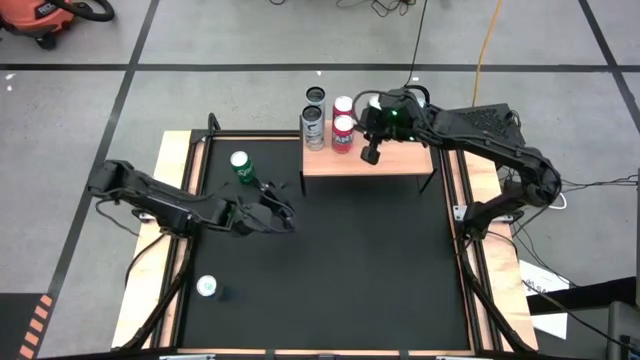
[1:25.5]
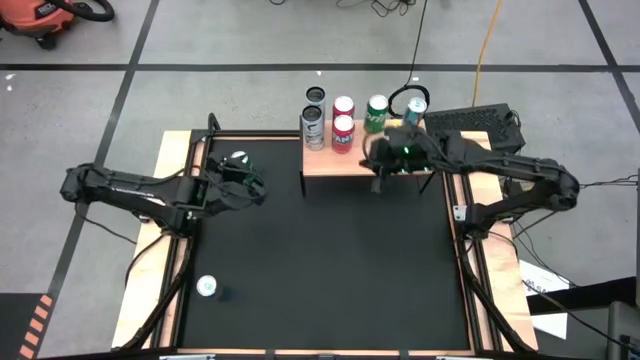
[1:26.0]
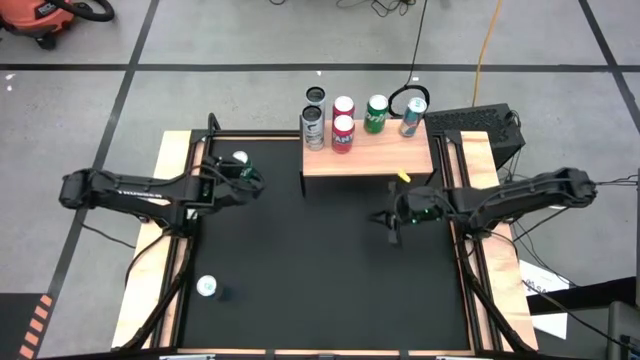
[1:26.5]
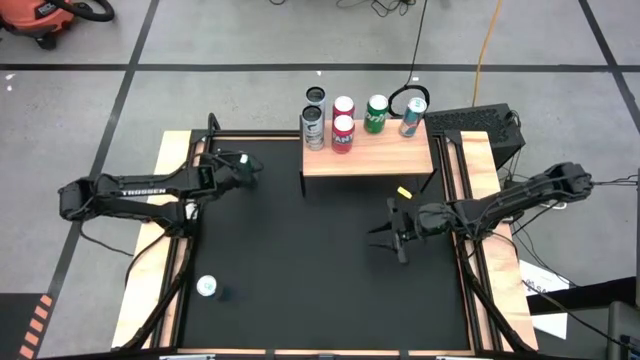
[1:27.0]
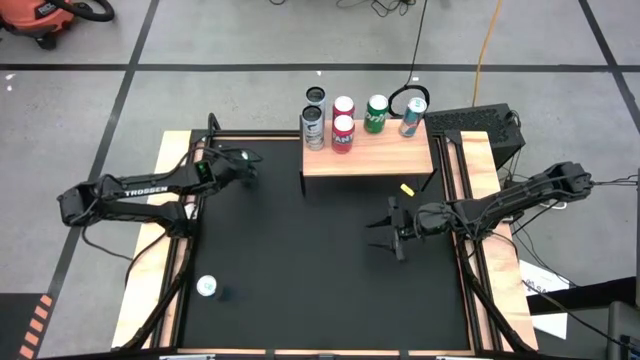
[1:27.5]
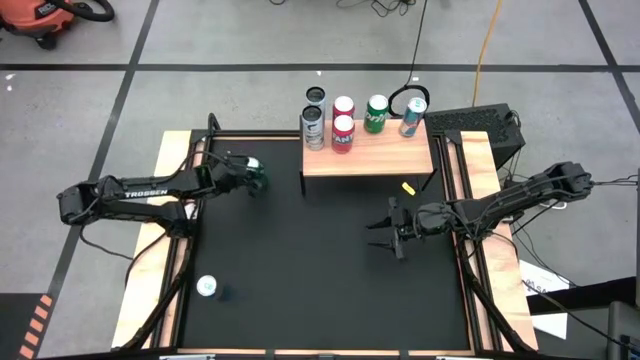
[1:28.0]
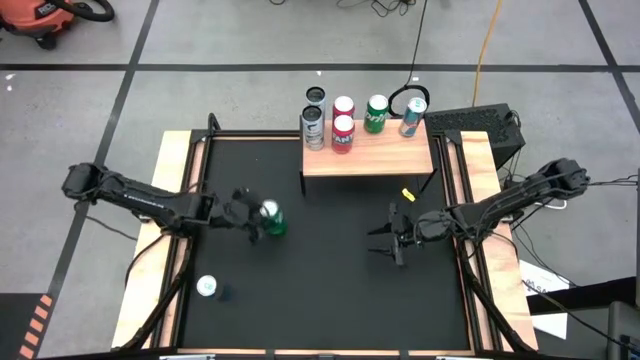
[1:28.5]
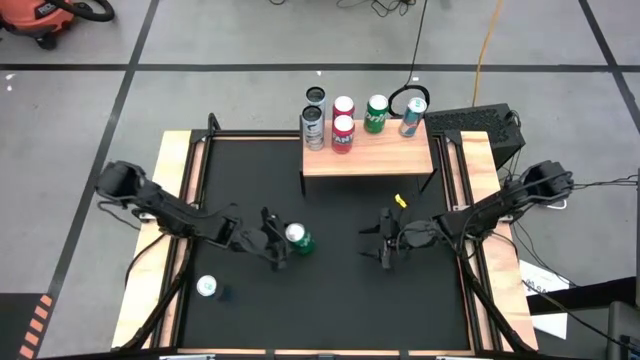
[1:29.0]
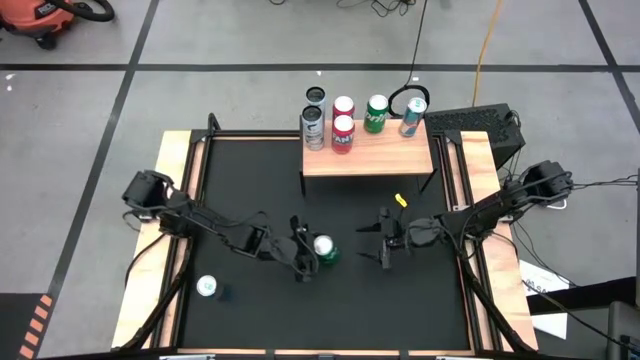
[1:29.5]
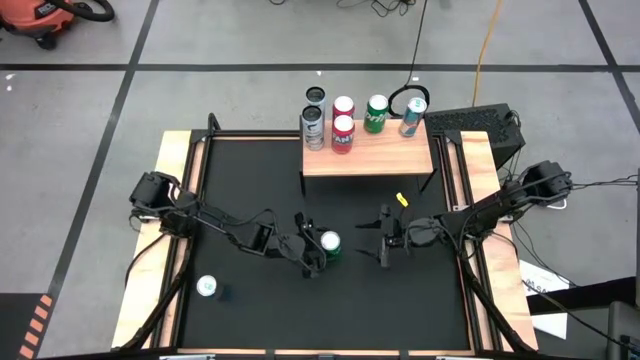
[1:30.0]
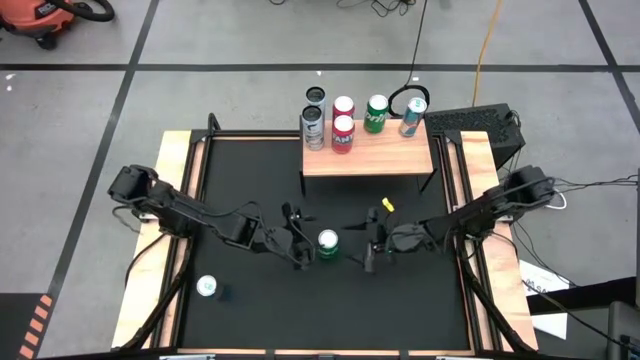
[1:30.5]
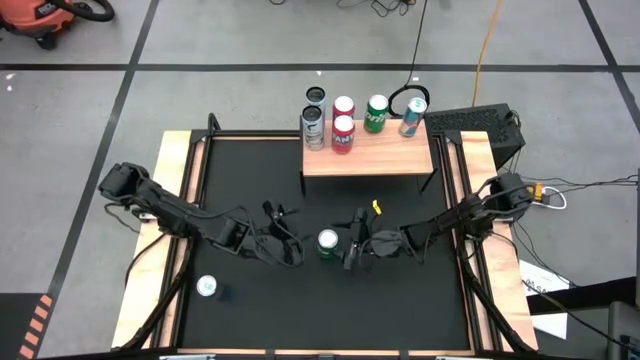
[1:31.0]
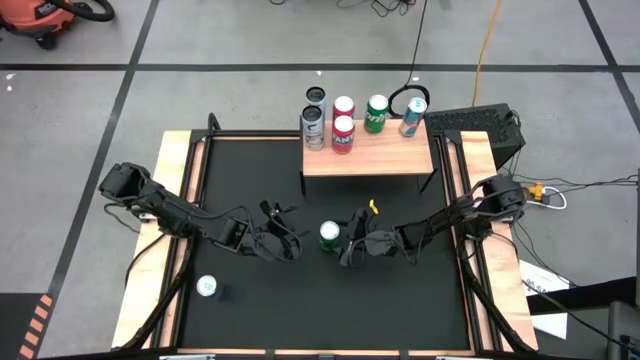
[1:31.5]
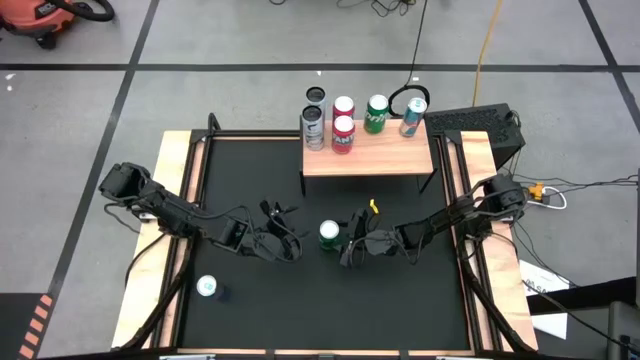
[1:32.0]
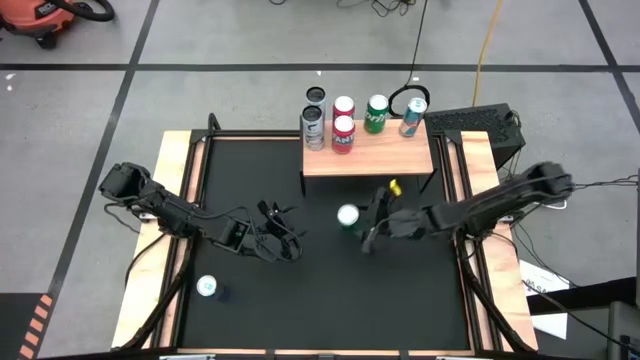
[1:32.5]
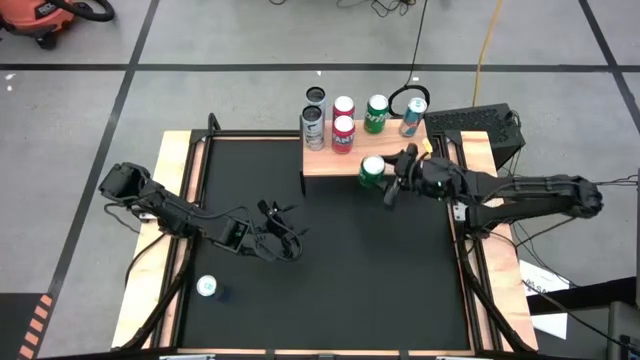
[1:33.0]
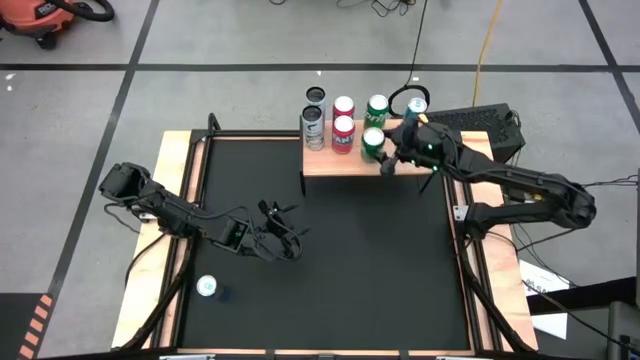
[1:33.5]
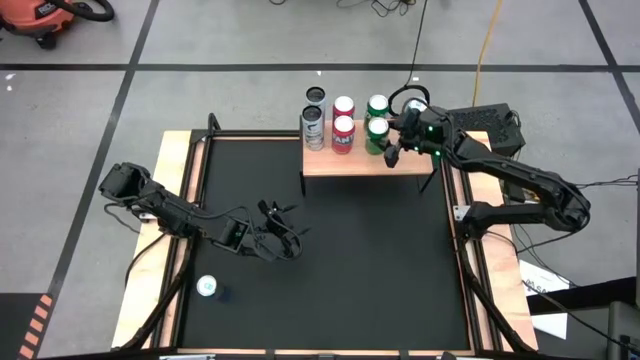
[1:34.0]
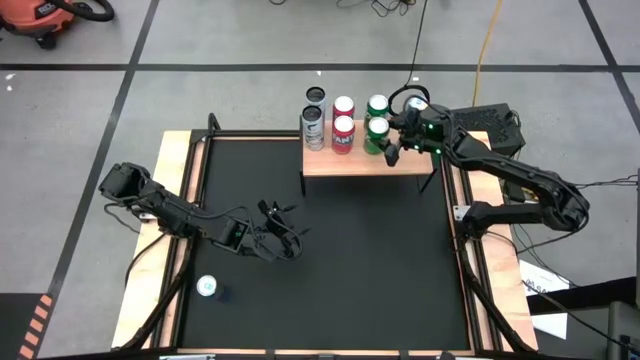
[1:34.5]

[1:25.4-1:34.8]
Task: Place canned beverage on shelf
Put the green soda can on the shelf aligned with the other green soda can

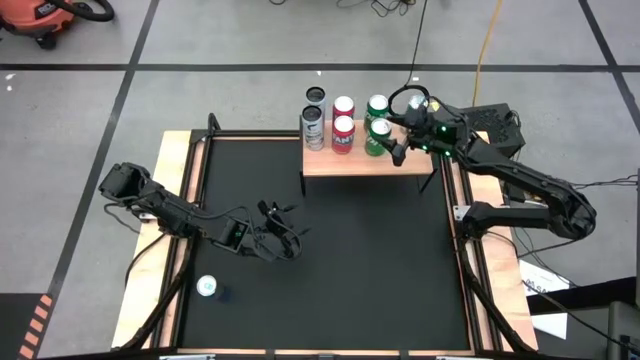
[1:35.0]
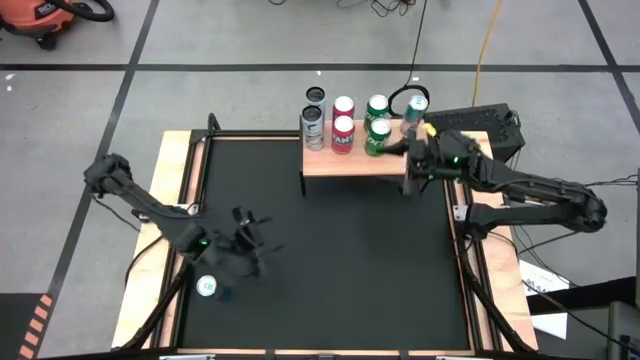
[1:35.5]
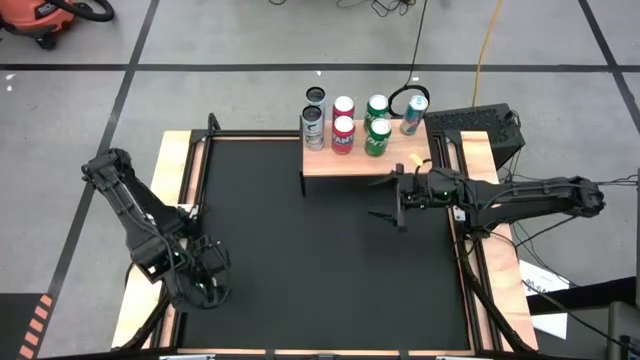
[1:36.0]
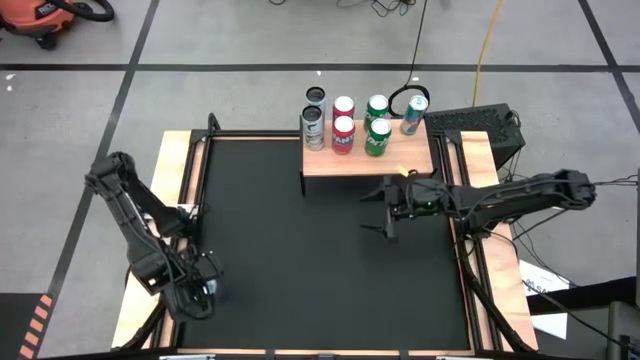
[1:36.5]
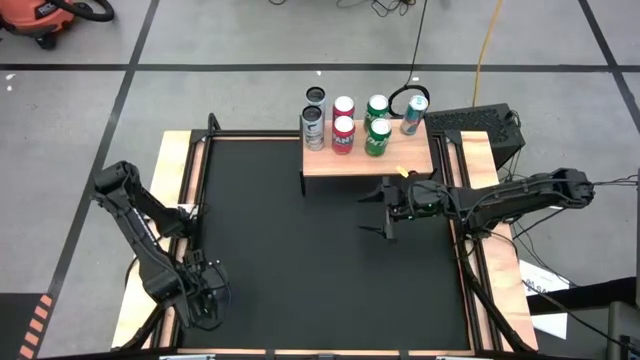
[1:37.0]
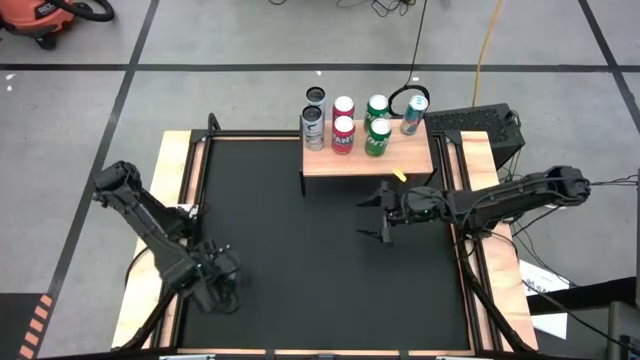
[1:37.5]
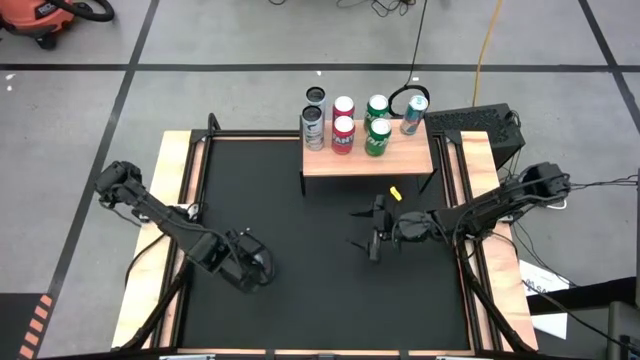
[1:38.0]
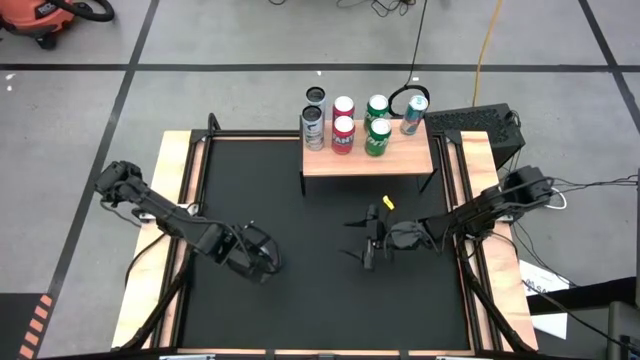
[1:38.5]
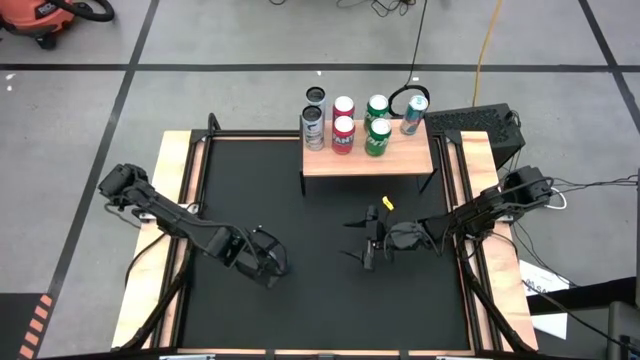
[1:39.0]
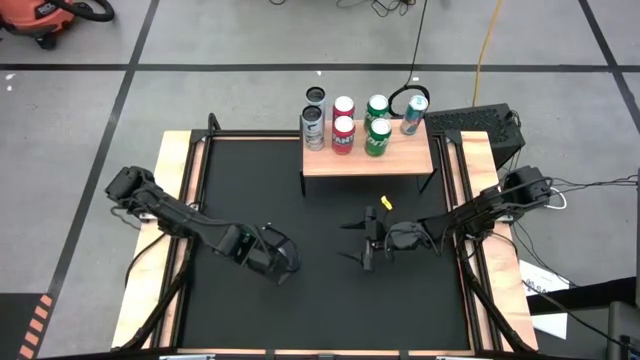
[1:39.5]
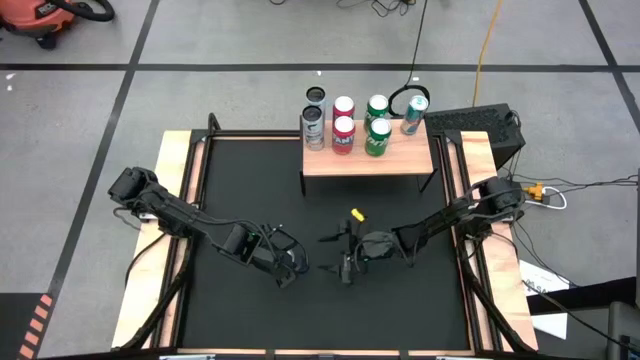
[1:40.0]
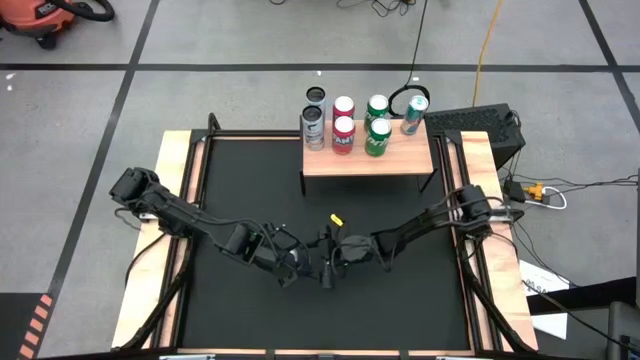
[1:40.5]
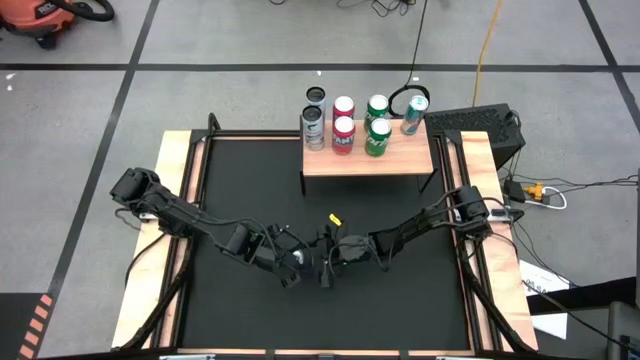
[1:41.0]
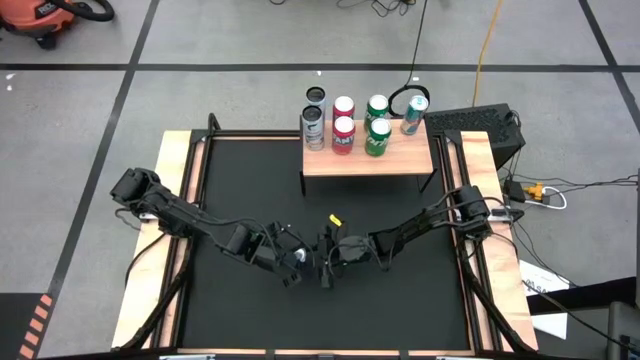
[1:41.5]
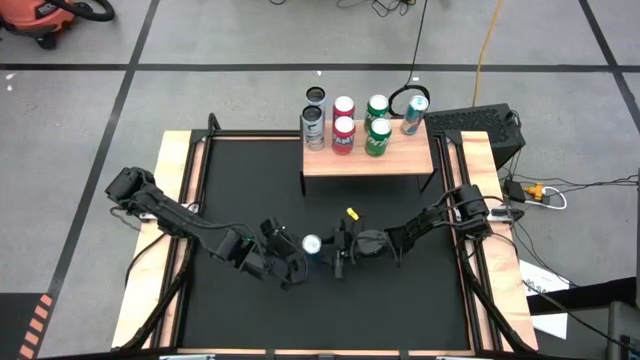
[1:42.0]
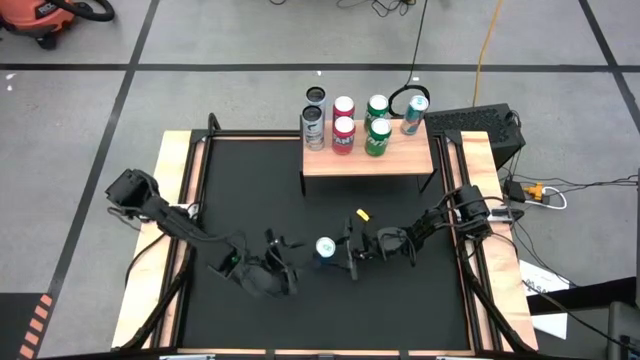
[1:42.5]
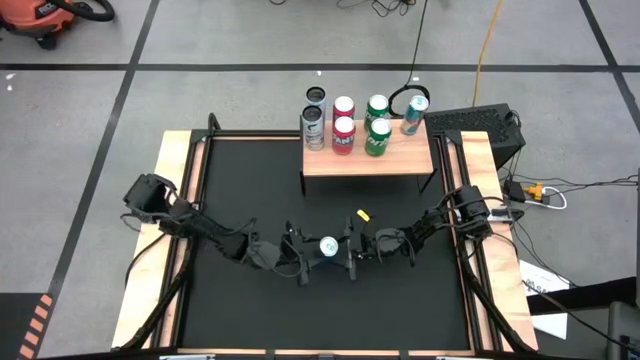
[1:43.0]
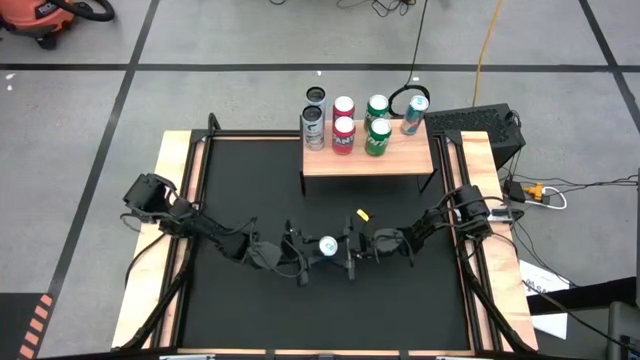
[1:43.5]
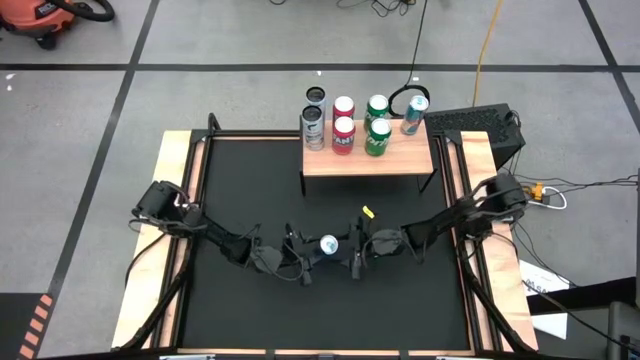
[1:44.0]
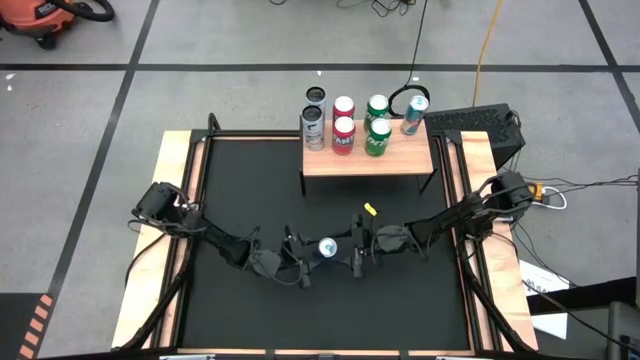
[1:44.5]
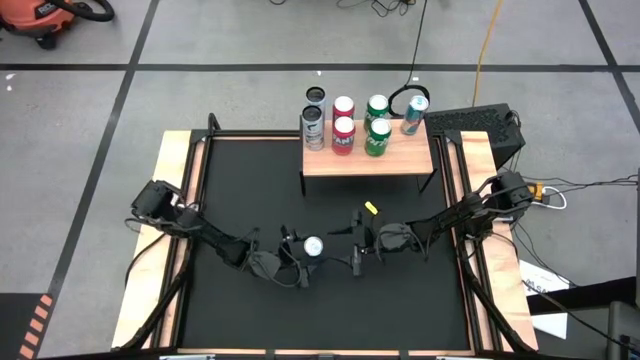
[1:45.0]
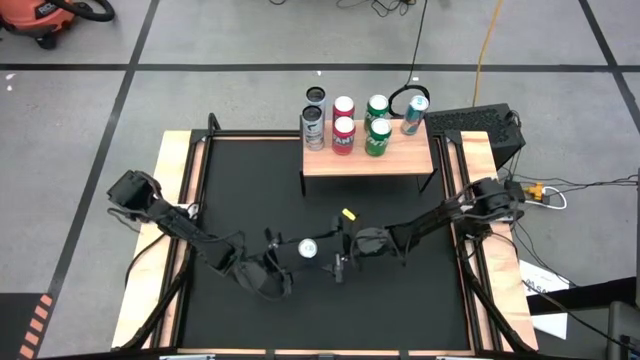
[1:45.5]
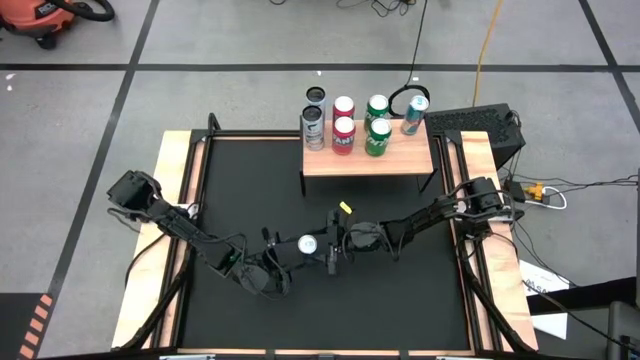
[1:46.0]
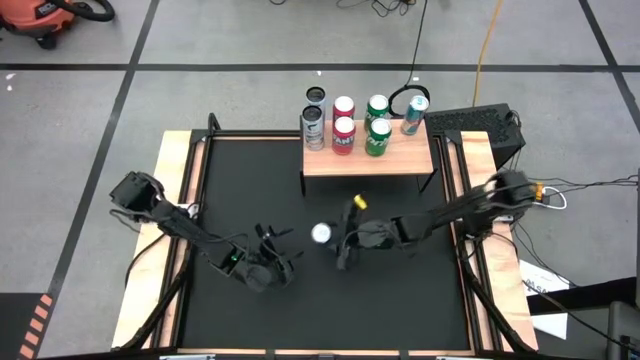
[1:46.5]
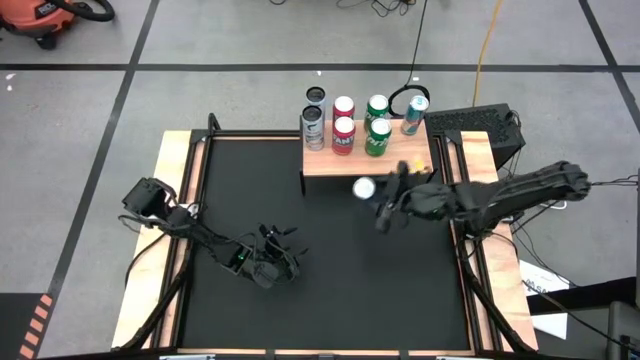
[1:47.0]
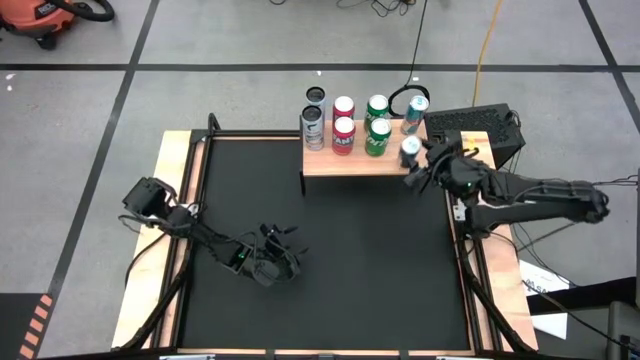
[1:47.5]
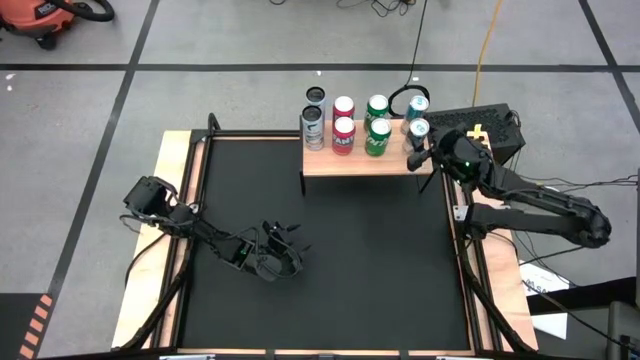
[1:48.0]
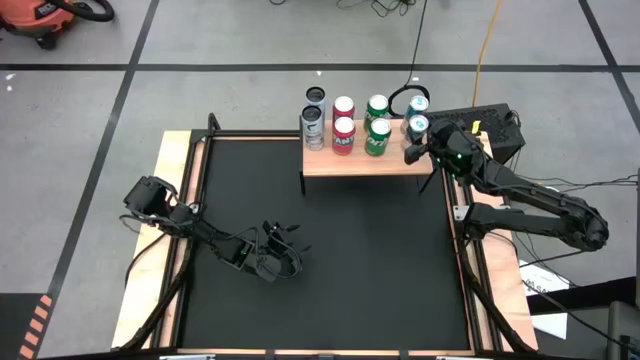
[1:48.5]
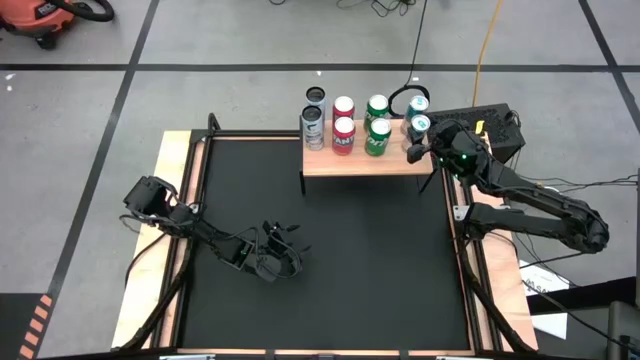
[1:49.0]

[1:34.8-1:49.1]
Put the blue soda can on the shelf aligned with the other blue soda can
